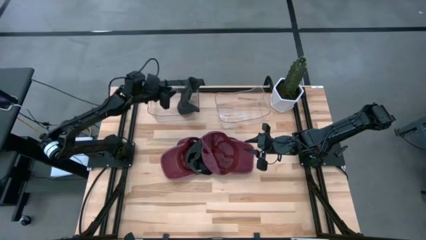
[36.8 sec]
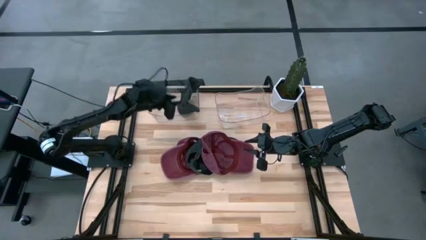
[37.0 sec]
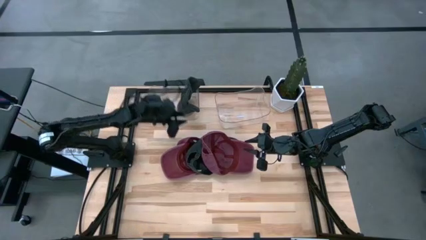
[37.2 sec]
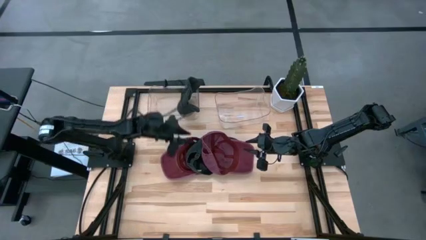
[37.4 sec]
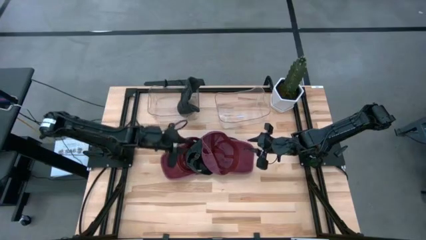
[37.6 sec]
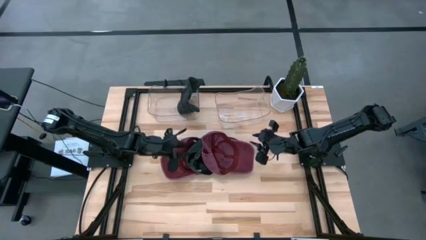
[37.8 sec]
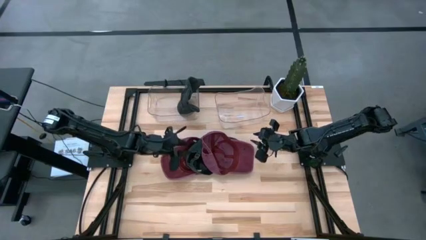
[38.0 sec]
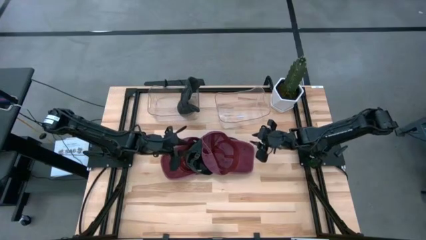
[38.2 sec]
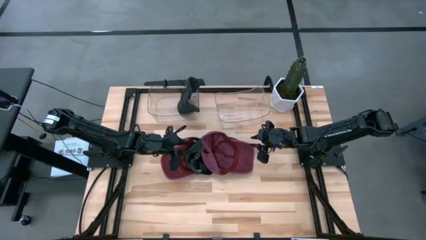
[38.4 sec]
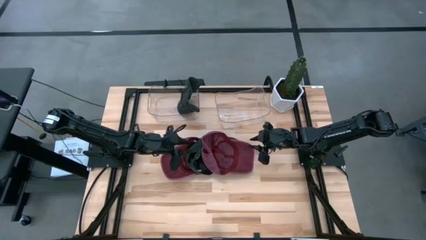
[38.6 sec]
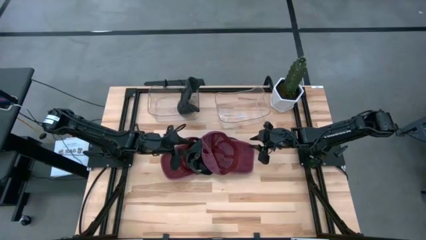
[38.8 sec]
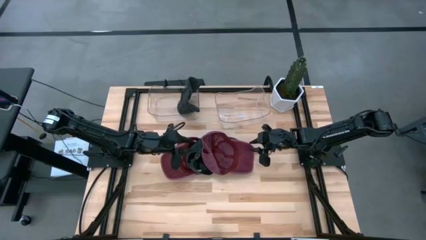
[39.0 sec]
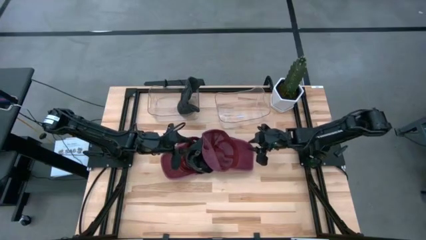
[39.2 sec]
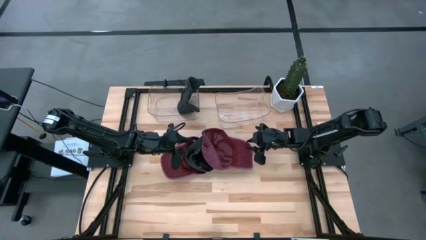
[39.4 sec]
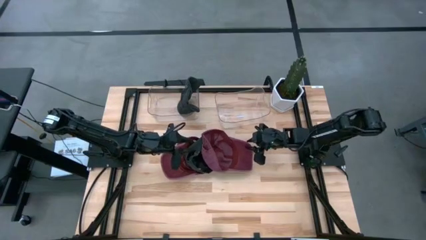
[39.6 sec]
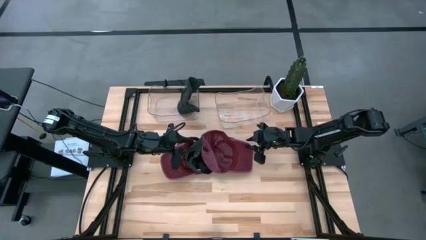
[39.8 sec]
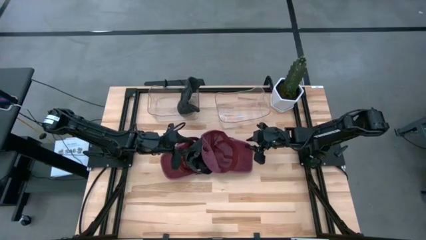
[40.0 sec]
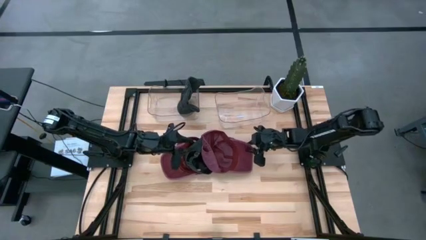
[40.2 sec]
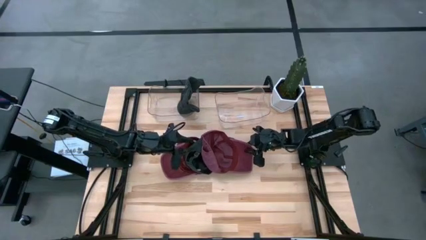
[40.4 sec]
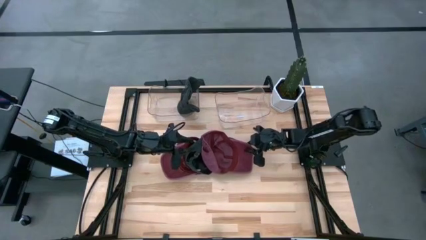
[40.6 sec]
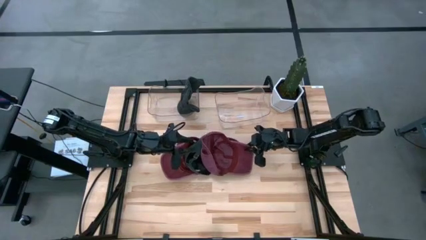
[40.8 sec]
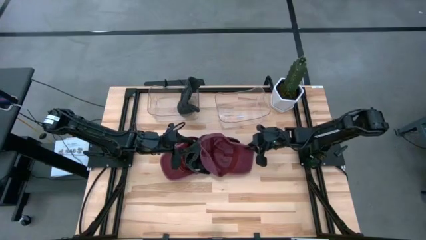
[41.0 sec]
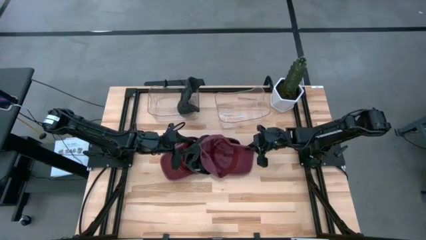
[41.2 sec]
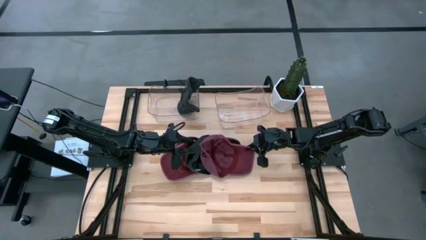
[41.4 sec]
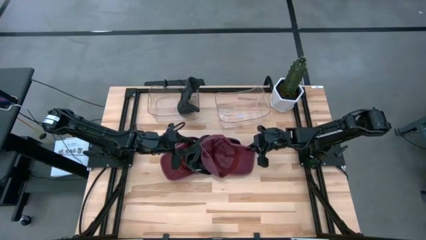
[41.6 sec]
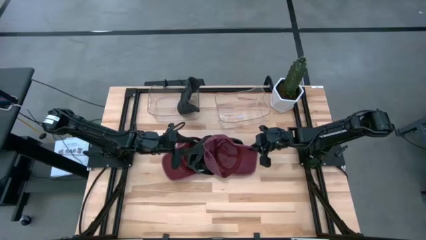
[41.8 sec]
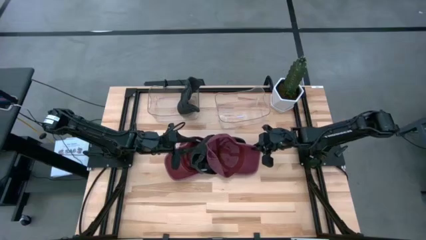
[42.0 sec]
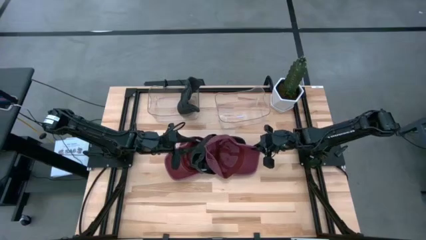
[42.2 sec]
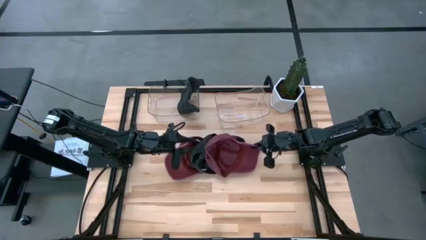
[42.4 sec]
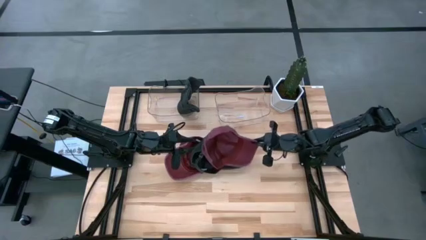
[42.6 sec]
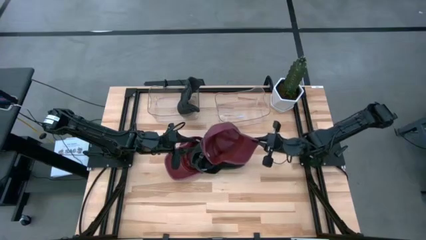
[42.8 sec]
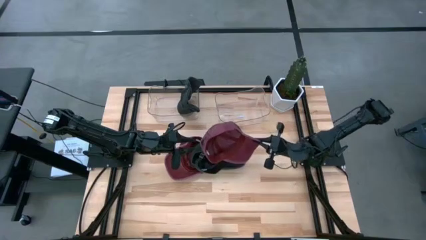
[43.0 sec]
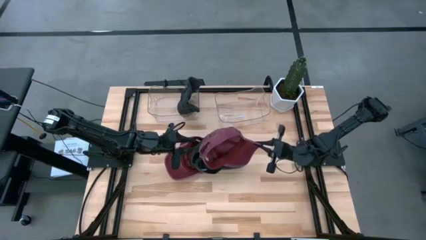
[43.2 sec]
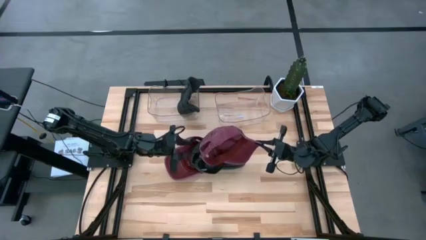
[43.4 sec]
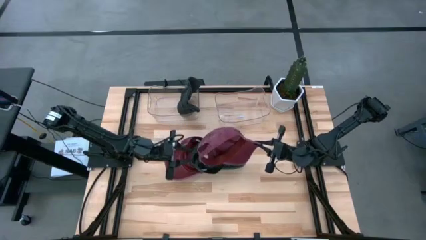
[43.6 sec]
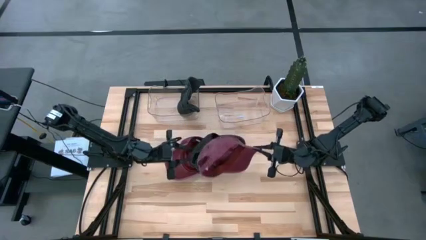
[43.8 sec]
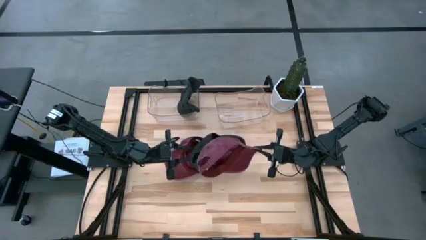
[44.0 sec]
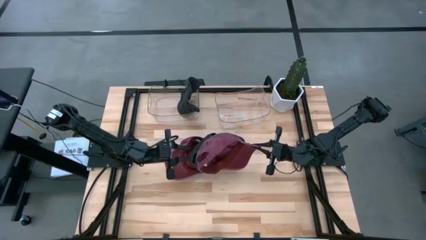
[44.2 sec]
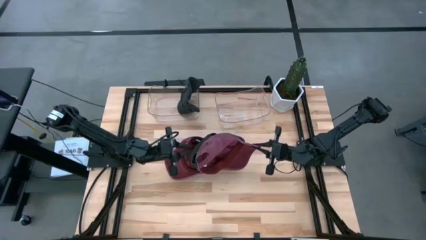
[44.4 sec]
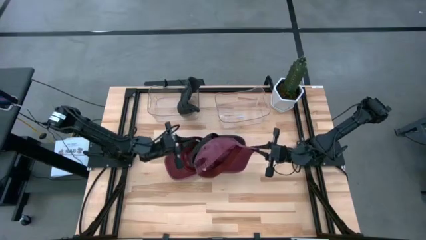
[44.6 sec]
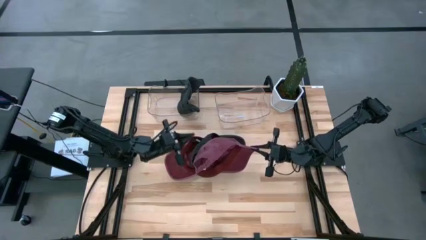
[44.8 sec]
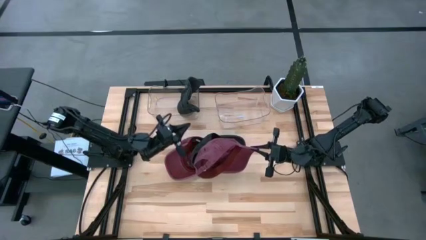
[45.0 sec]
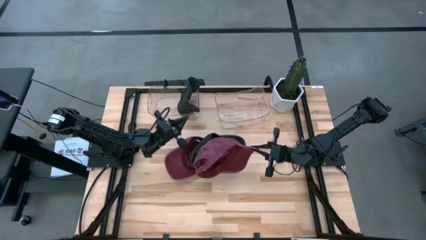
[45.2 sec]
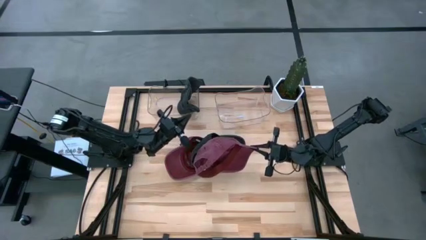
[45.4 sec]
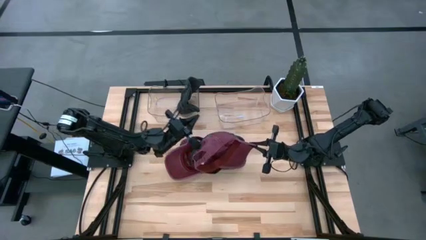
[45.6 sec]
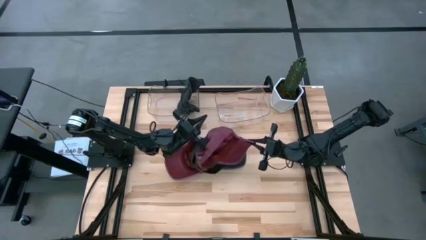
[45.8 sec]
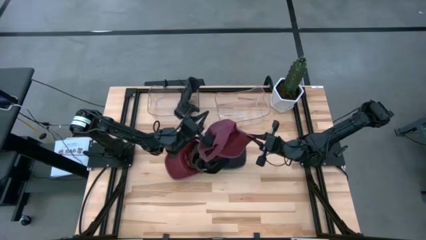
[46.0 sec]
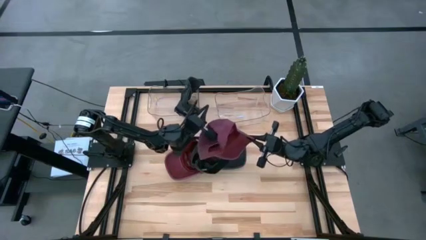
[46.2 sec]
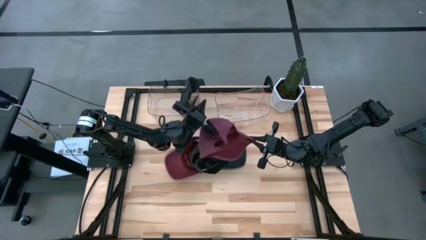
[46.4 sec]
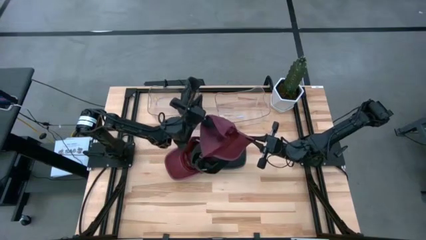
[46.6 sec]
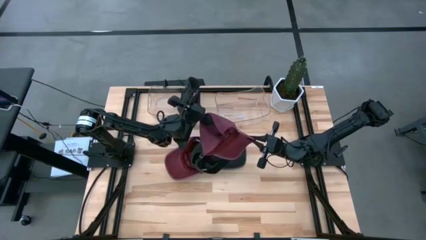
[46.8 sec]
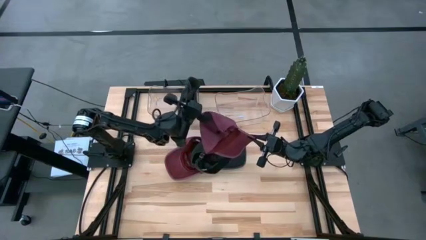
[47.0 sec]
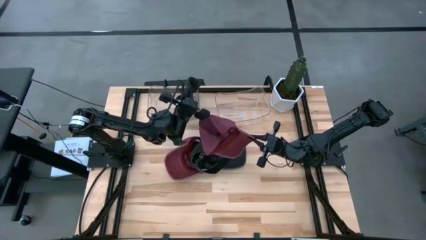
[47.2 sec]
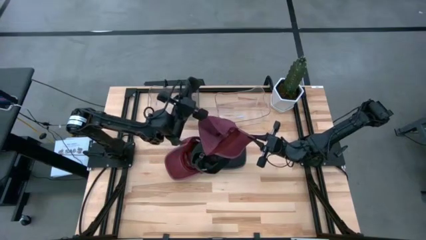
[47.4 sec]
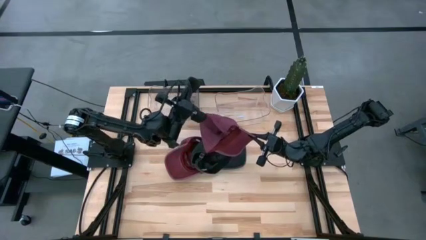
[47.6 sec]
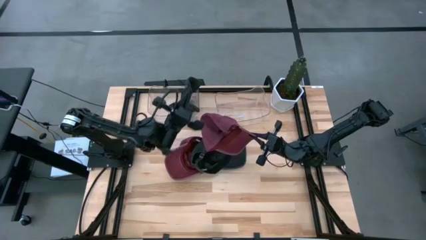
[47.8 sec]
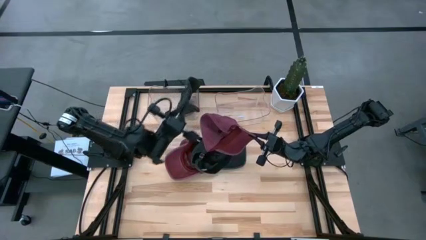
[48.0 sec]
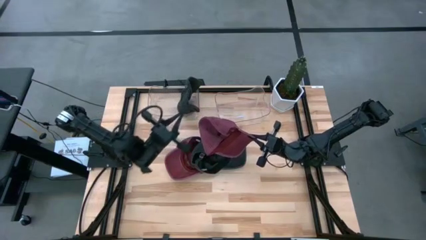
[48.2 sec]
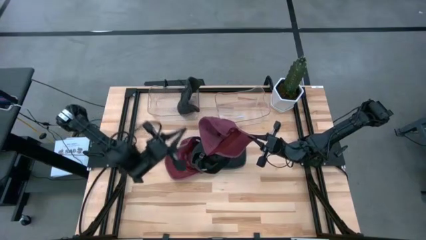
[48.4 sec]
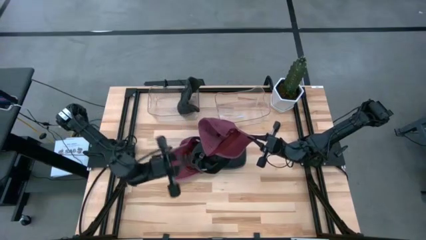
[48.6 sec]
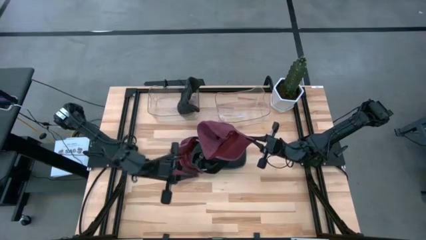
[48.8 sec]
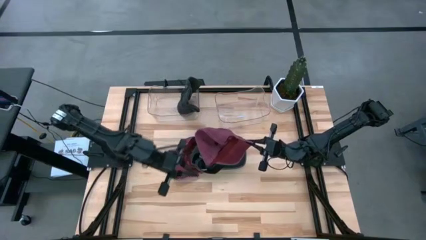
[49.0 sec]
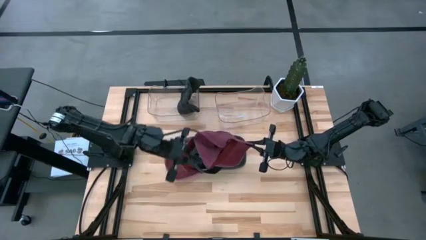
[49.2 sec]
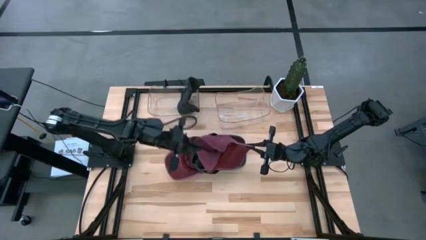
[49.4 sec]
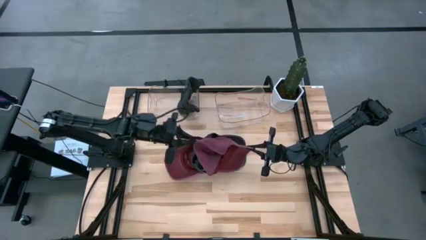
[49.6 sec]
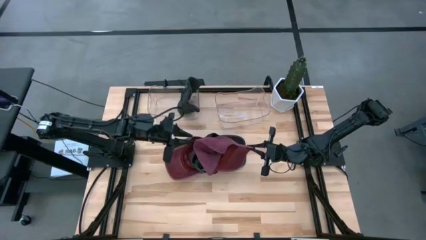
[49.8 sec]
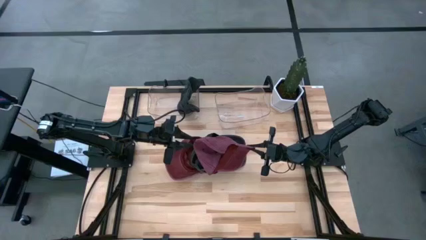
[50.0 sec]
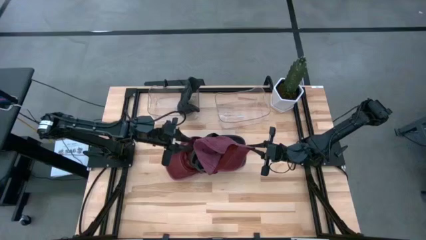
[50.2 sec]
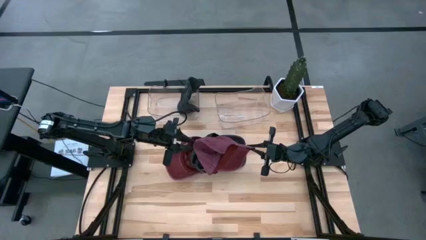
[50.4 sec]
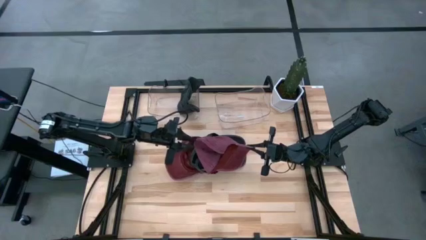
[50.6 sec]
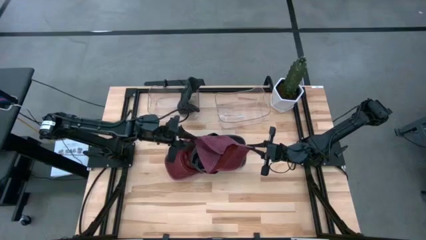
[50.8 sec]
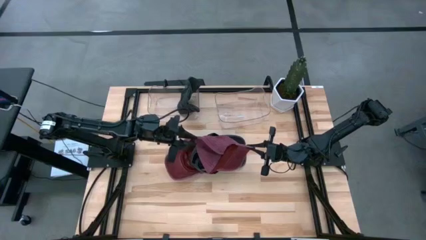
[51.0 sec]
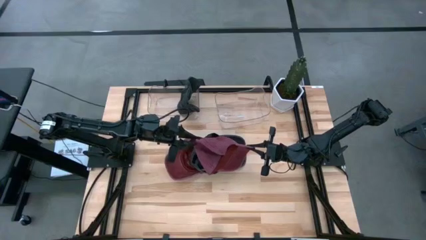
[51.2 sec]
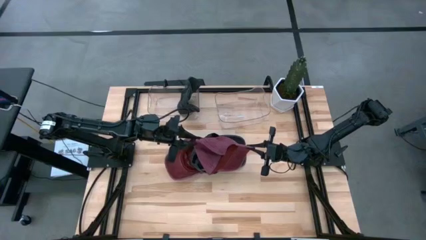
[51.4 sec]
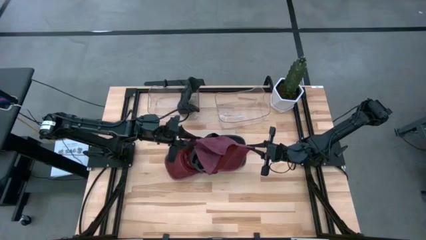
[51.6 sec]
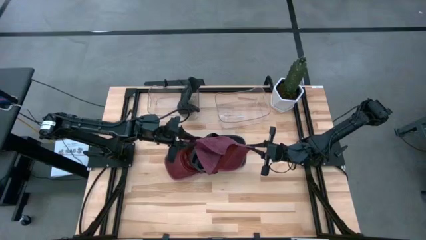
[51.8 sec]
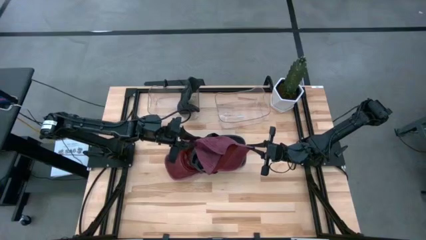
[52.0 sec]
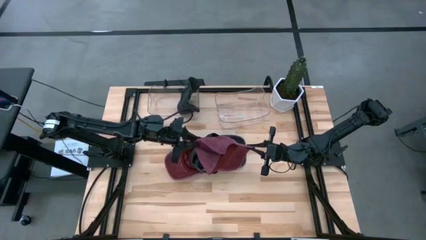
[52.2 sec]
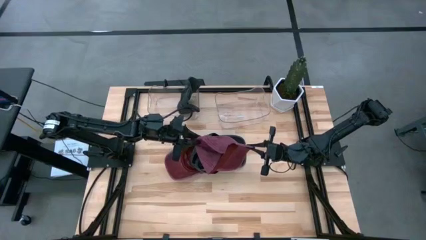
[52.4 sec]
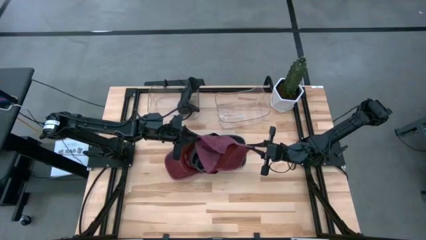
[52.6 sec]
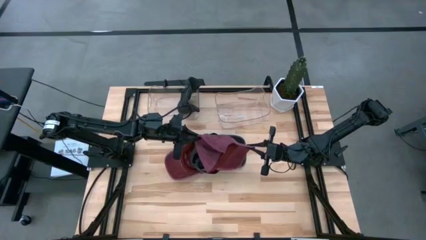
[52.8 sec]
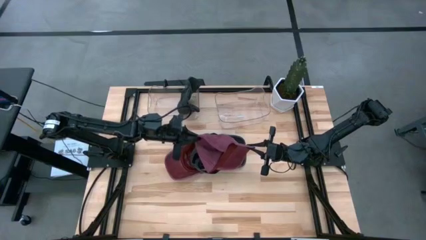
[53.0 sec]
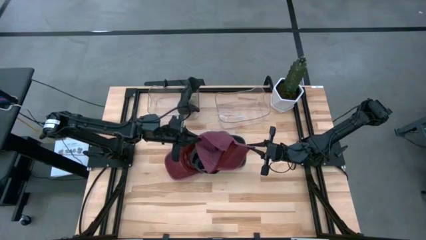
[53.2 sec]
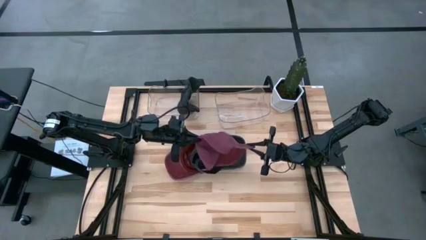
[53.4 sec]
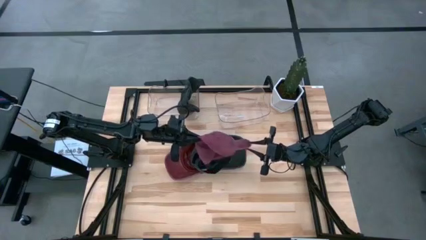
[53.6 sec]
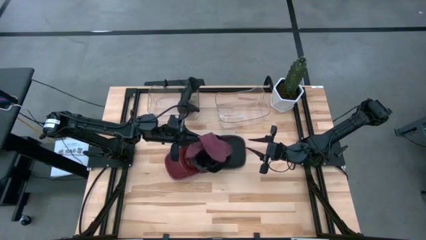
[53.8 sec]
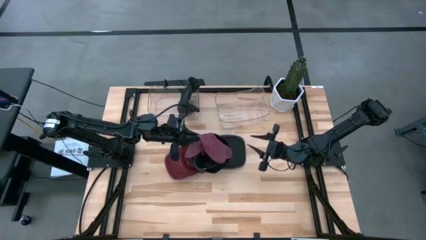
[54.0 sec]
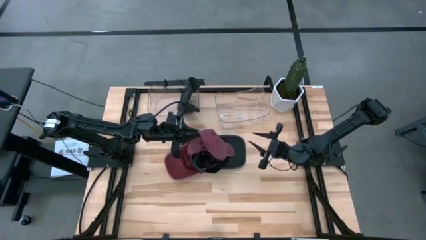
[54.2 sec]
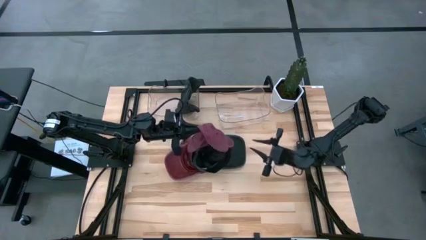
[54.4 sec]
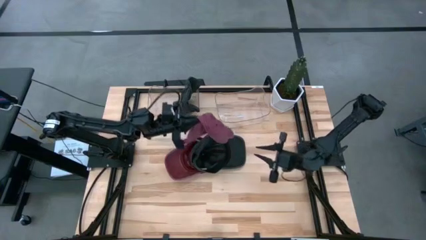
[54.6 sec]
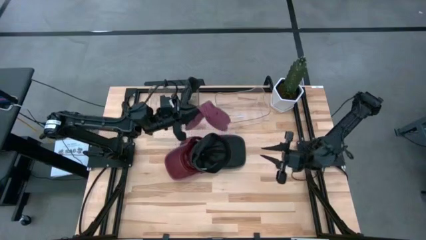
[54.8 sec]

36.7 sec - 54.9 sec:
Task: Pick & Place hat
Put the red cap into the right transparent bin
